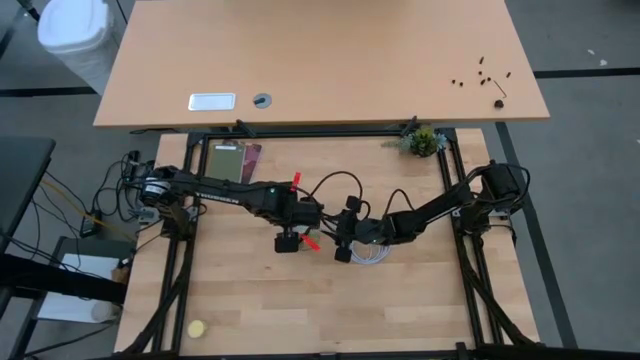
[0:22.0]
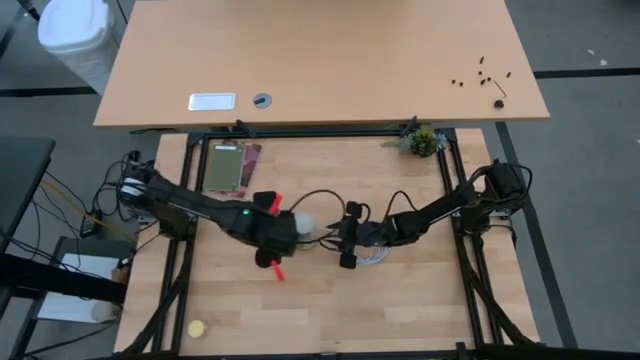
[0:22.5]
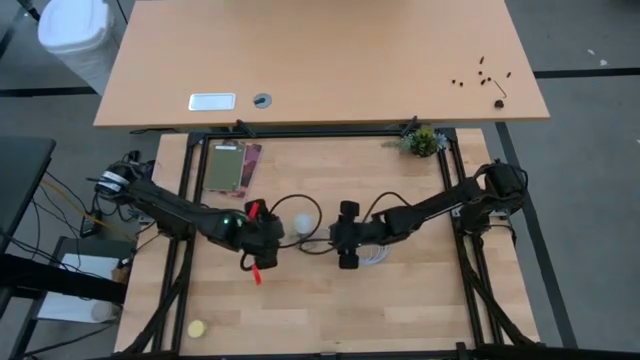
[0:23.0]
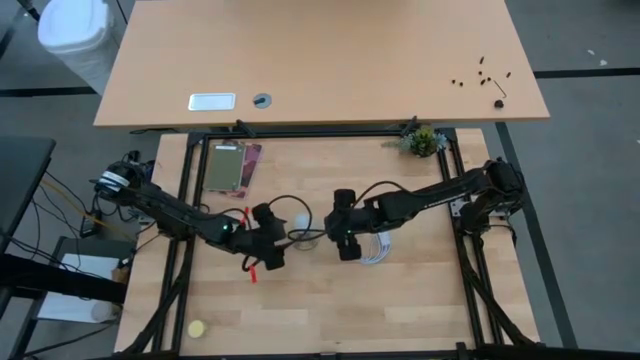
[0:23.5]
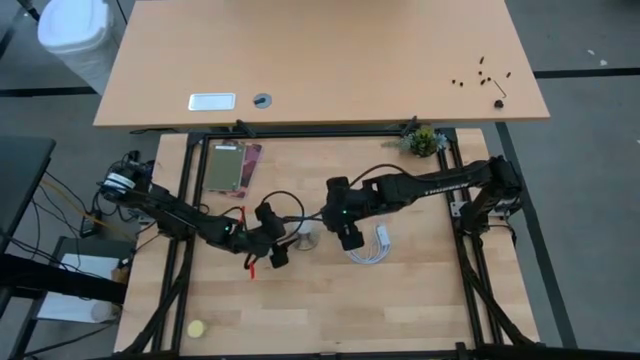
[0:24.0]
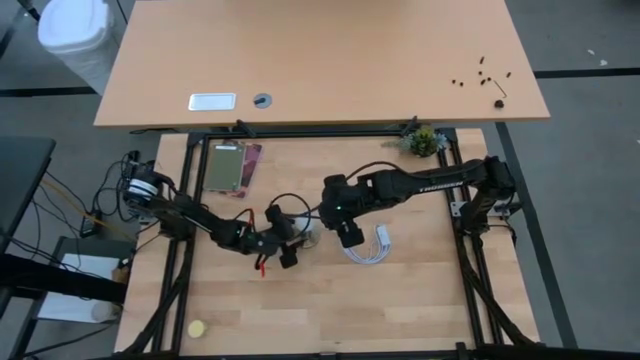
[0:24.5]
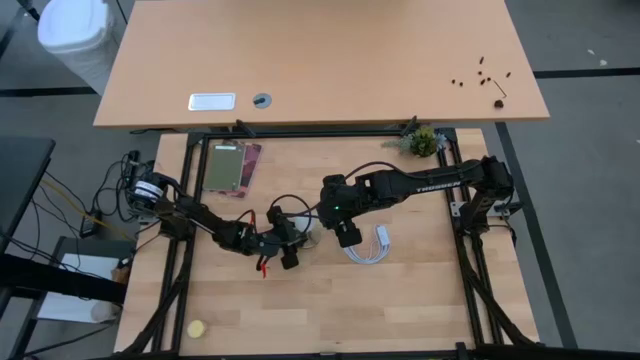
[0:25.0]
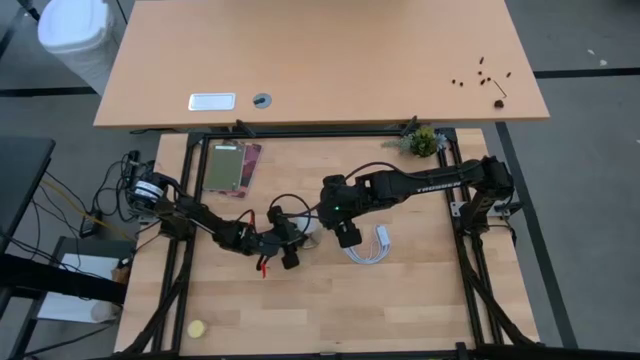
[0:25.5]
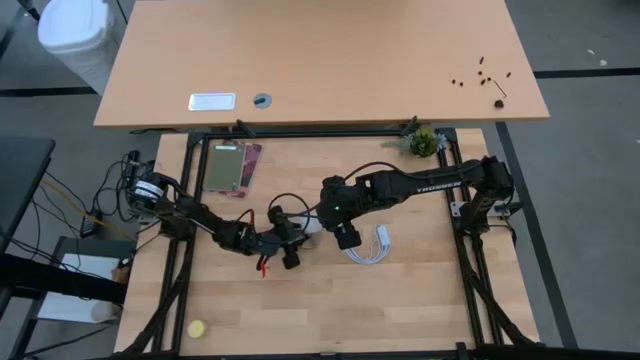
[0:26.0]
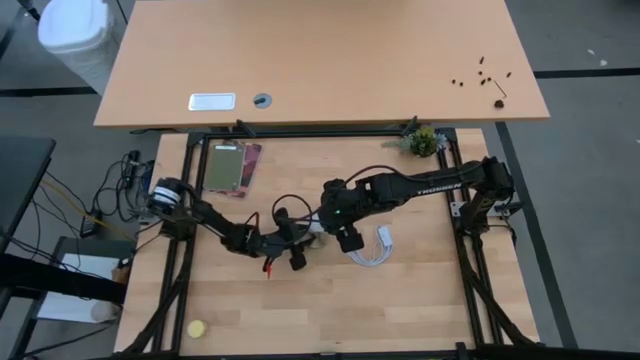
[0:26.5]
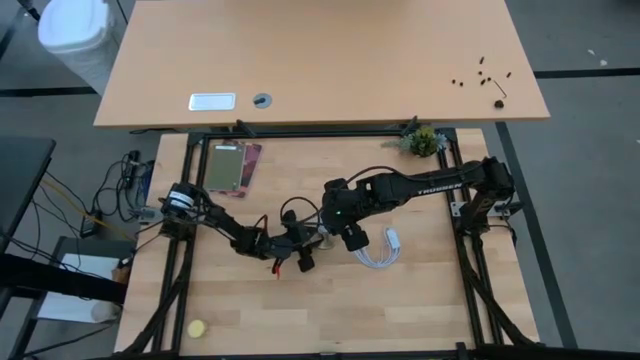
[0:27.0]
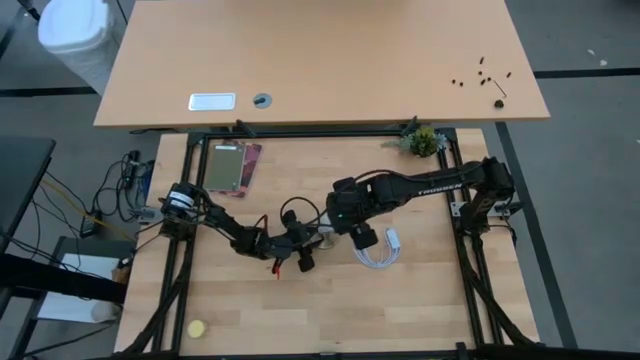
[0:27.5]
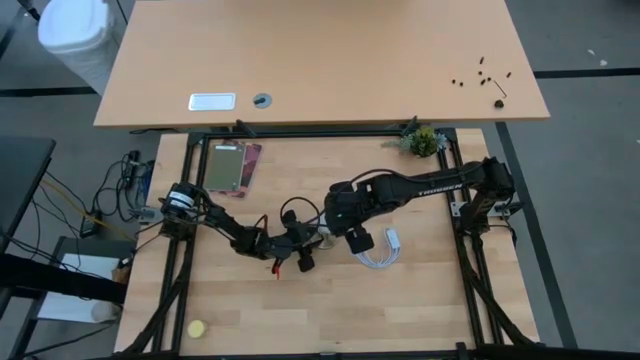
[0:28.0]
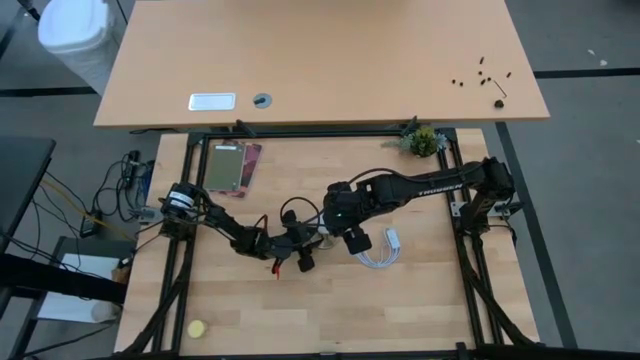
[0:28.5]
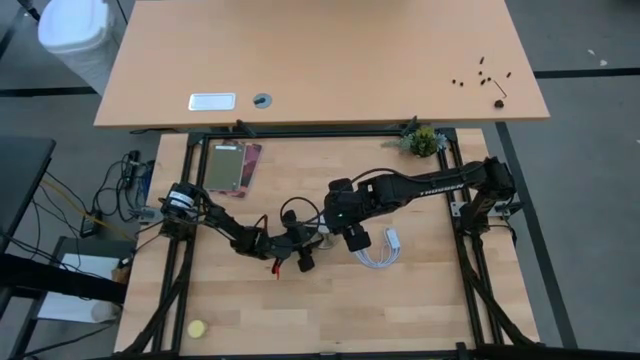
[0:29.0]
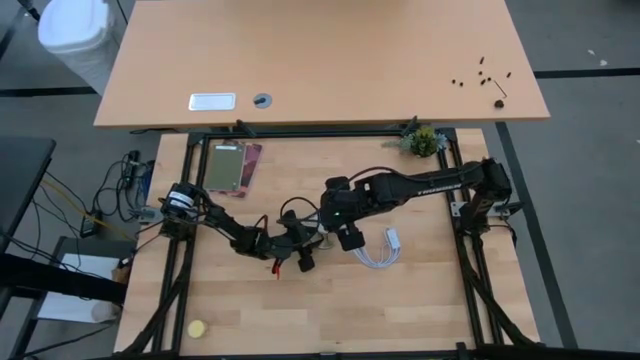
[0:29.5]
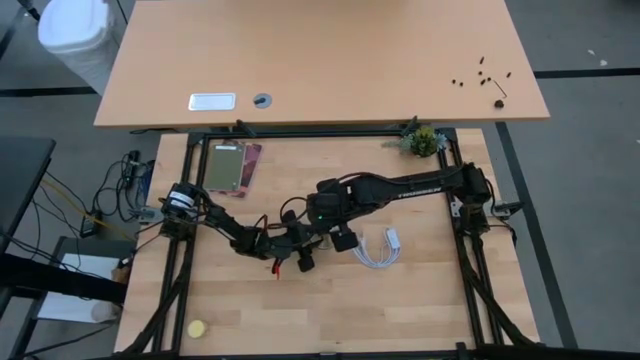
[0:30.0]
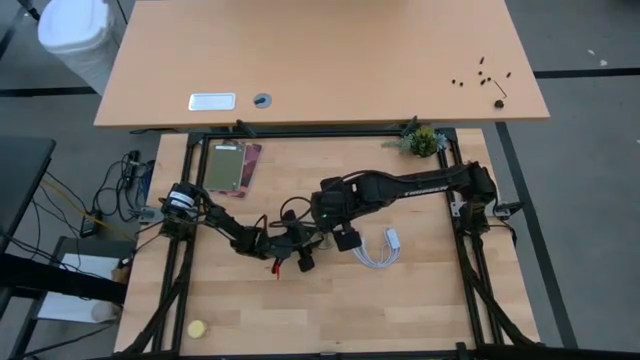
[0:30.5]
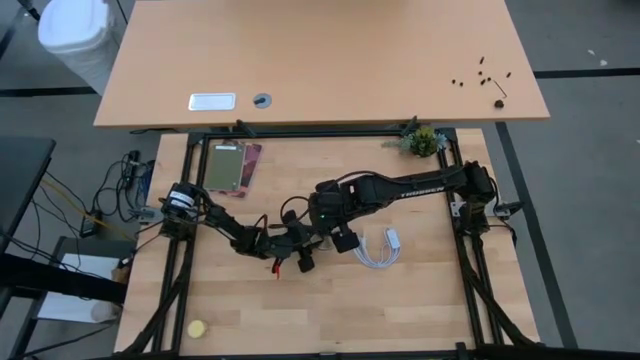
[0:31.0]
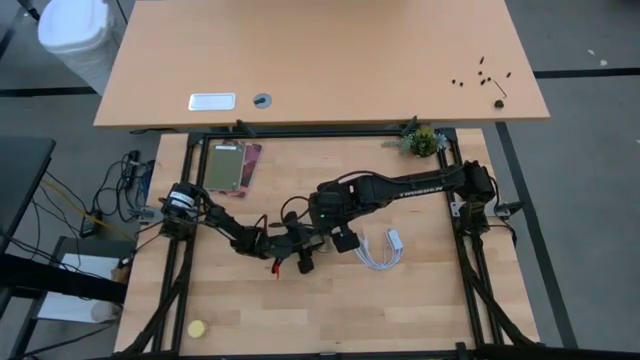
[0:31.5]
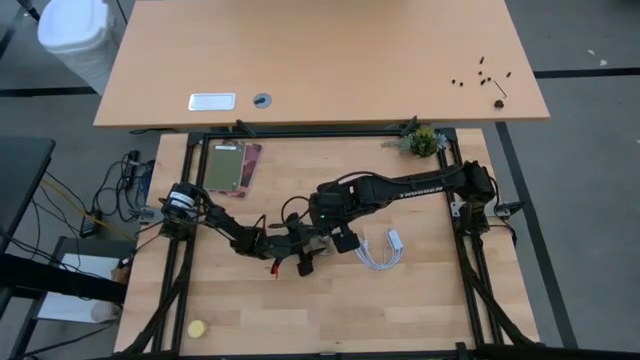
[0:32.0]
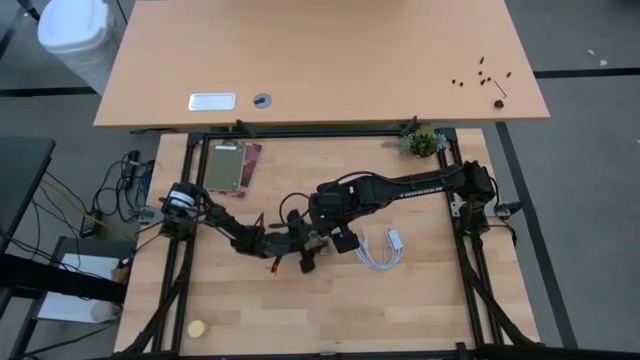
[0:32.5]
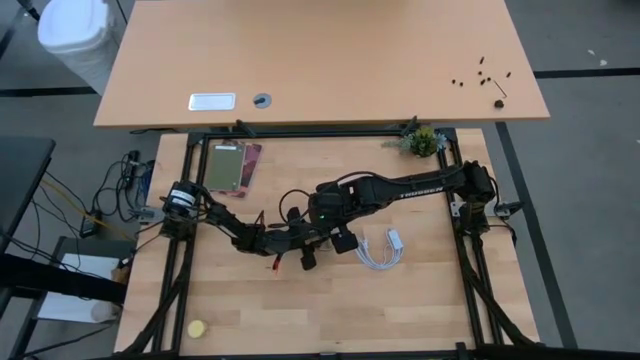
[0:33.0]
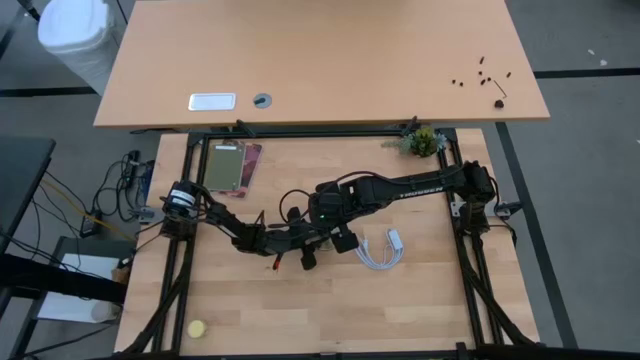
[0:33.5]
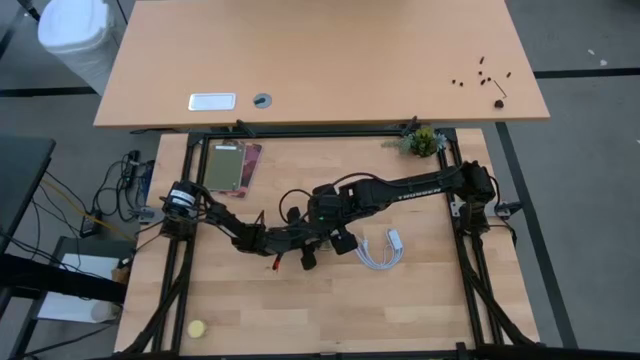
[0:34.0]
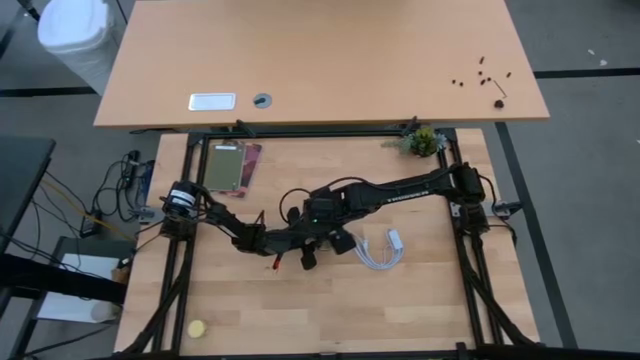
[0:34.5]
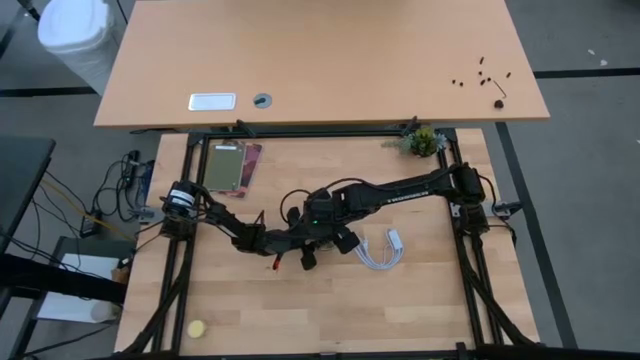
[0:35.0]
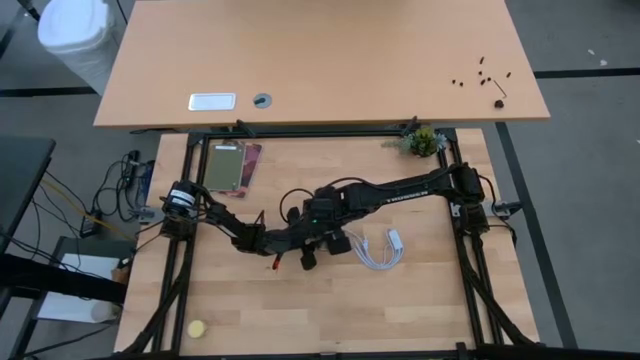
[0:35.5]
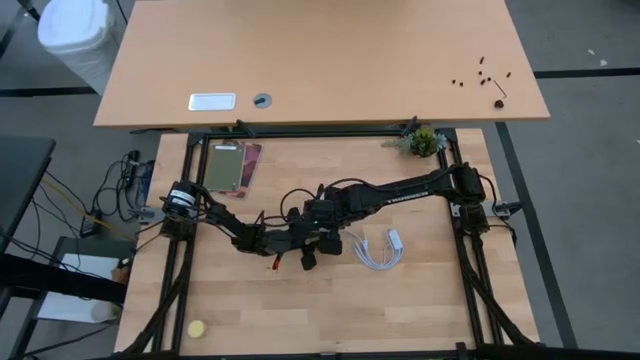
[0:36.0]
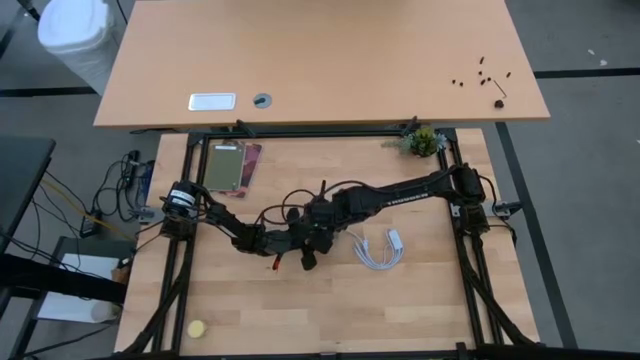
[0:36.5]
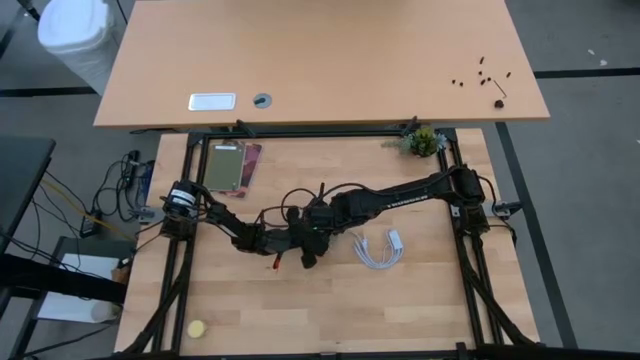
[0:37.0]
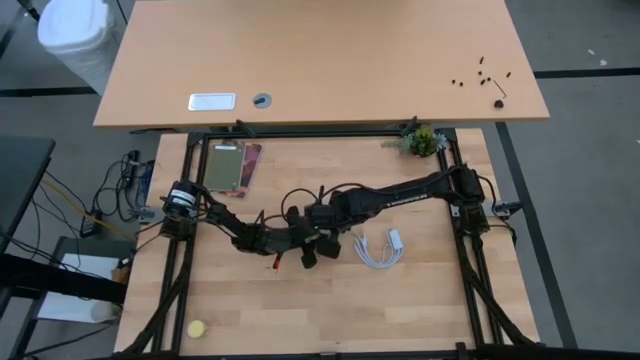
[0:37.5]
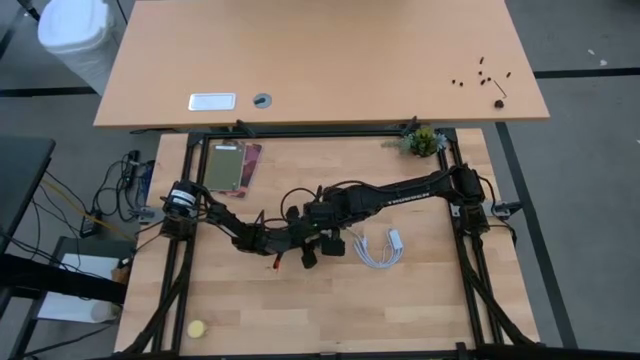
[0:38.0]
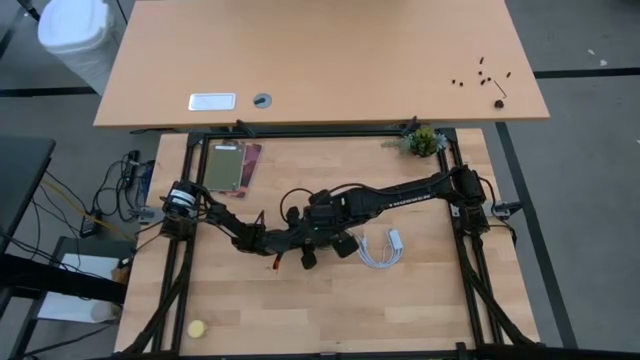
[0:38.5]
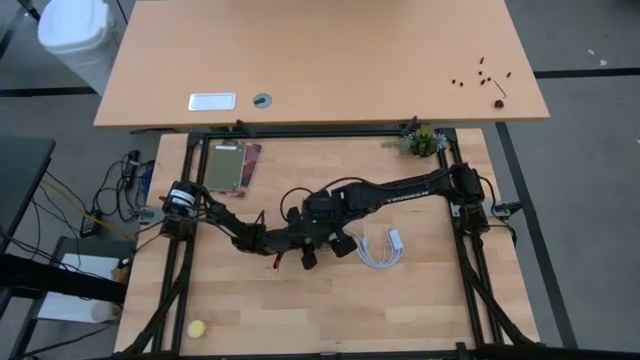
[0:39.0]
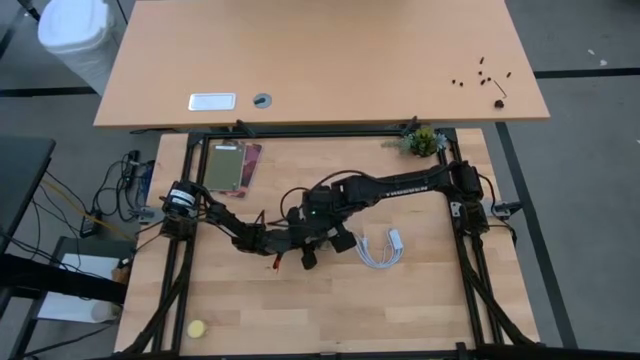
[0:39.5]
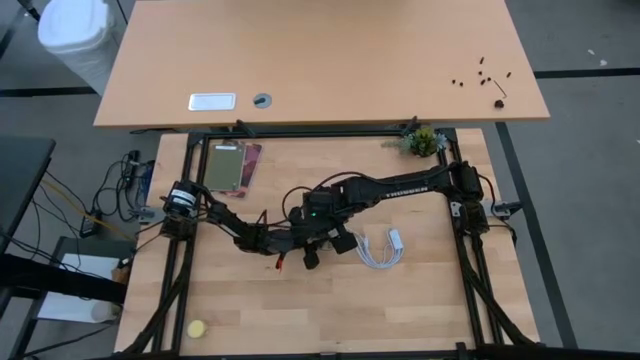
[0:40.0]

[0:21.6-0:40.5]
Task: Screw lightbulb
Insert the white lightbulb into the desk lamp

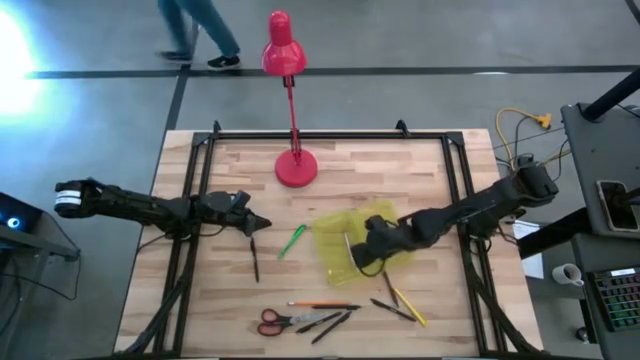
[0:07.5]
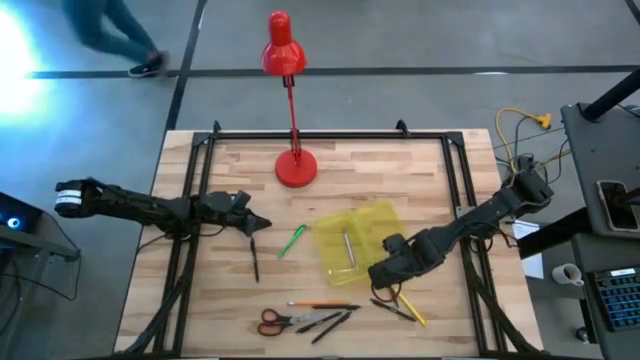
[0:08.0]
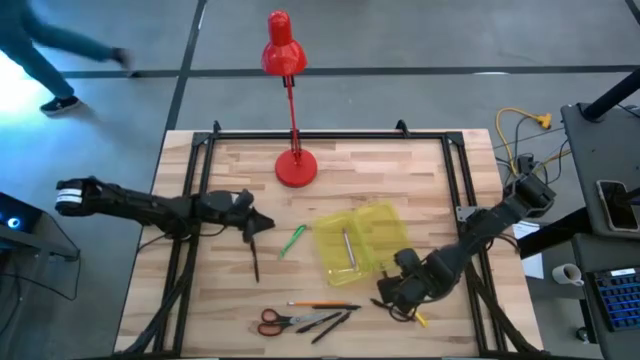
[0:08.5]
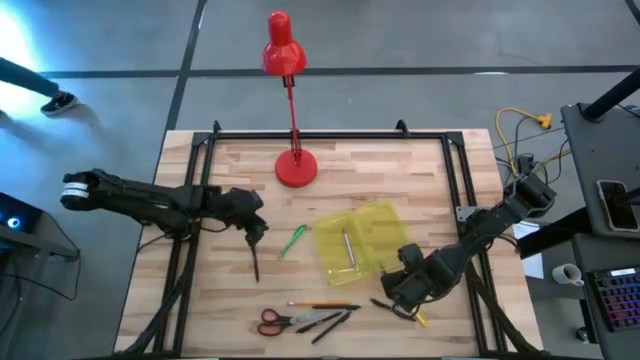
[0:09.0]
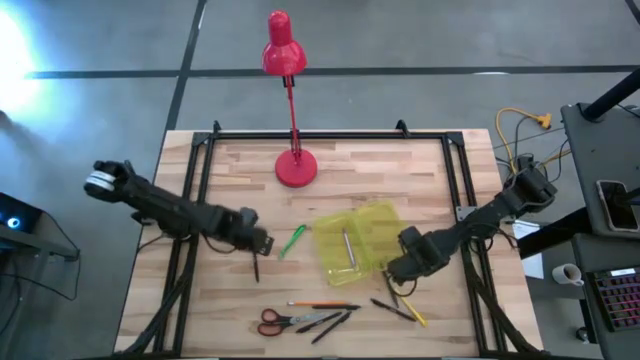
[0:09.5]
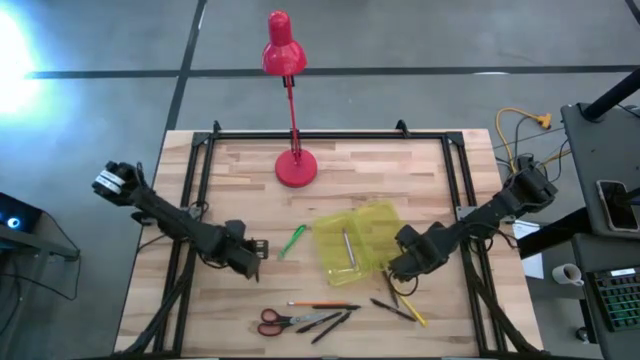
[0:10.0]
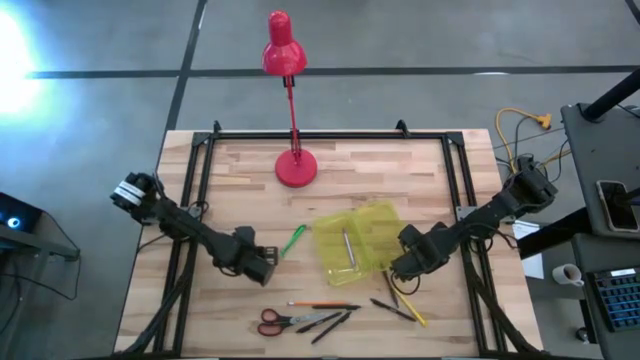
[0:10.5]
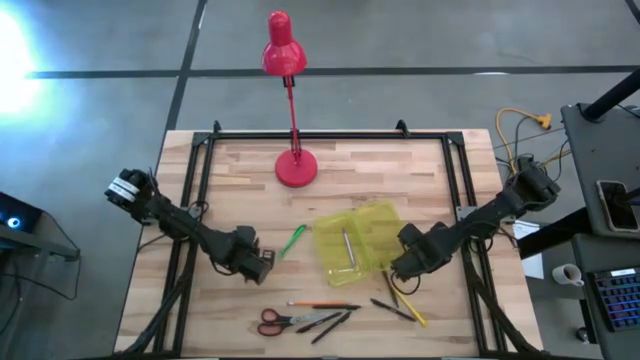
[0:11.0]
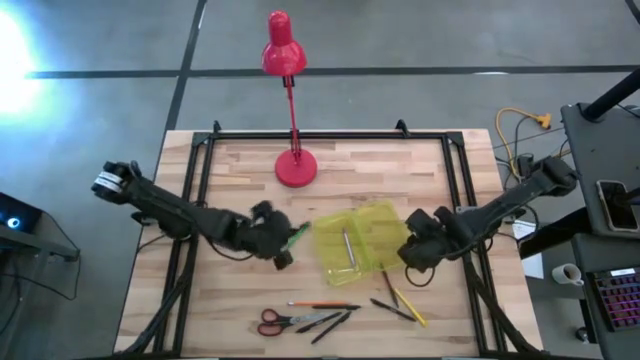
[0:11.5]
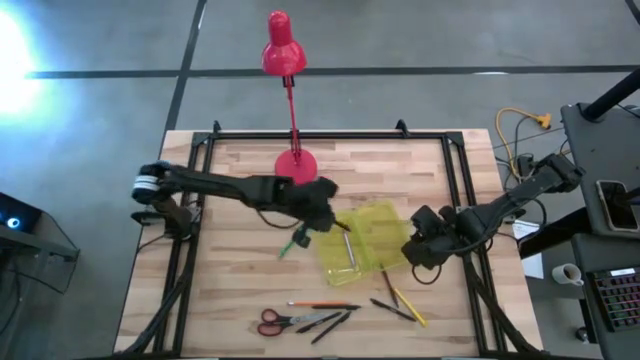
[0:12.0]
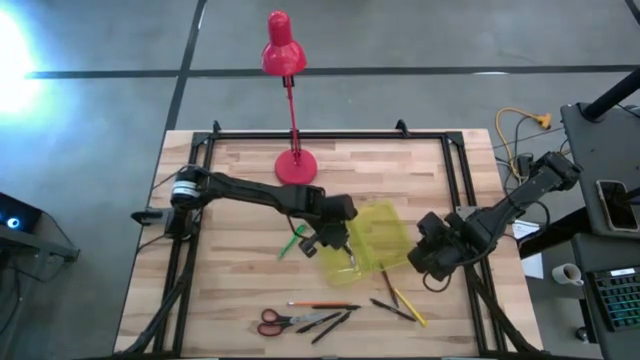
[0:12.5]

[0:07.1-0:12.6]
Task: Pick & place school supplies into a supply box
Put the black pen into the yellow supply box
